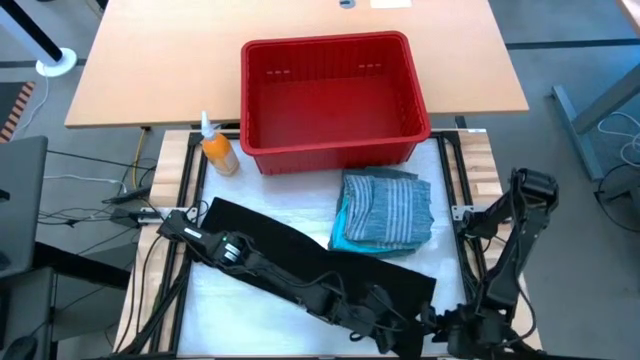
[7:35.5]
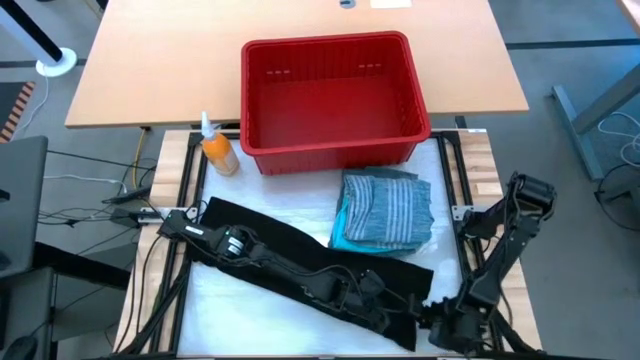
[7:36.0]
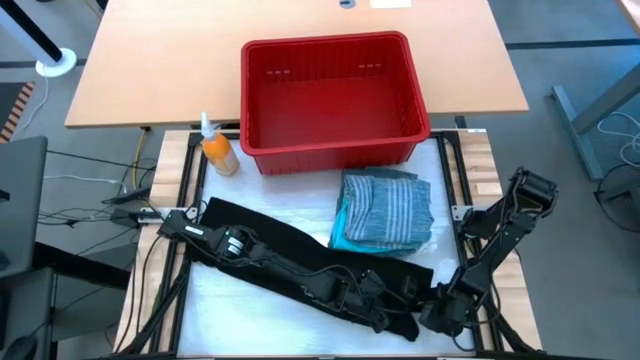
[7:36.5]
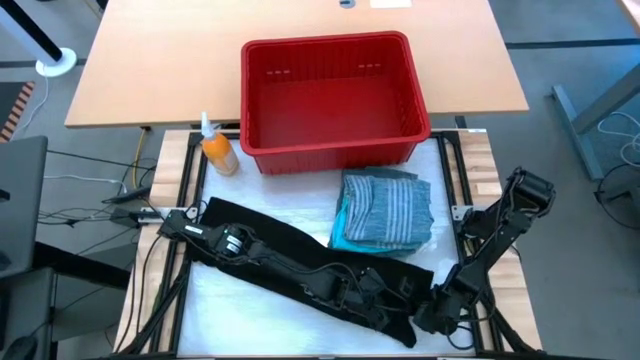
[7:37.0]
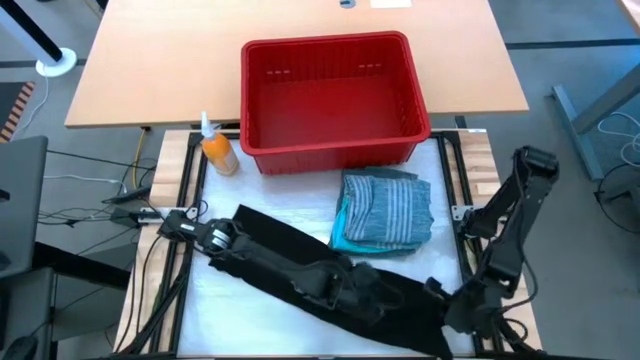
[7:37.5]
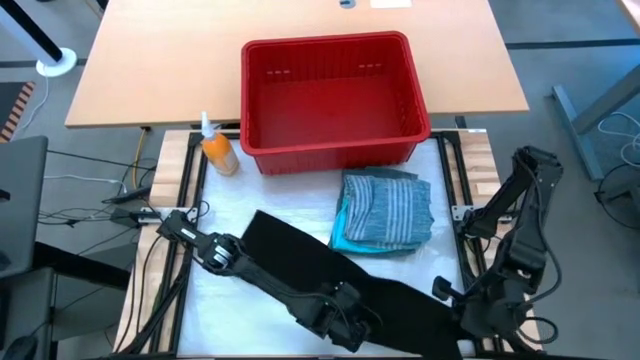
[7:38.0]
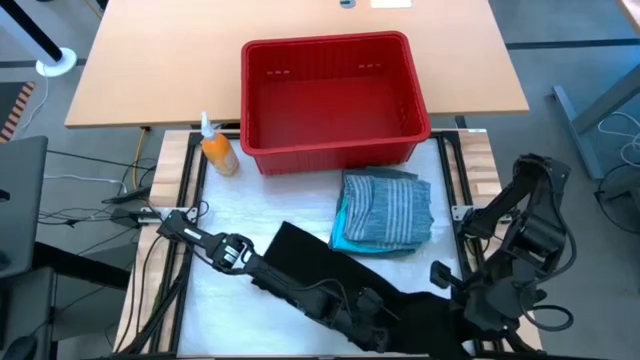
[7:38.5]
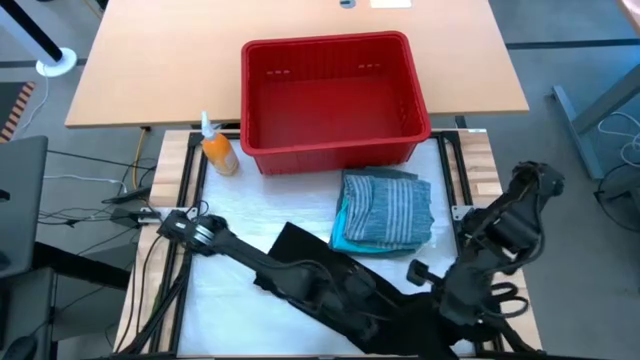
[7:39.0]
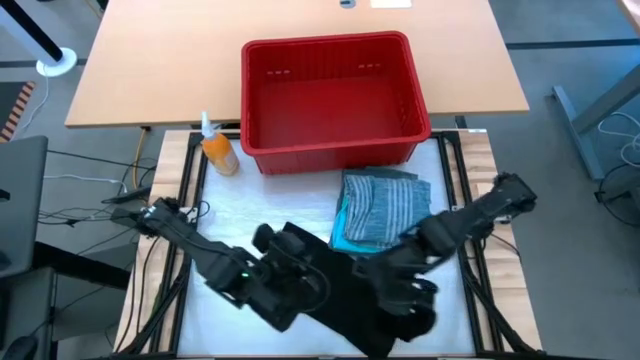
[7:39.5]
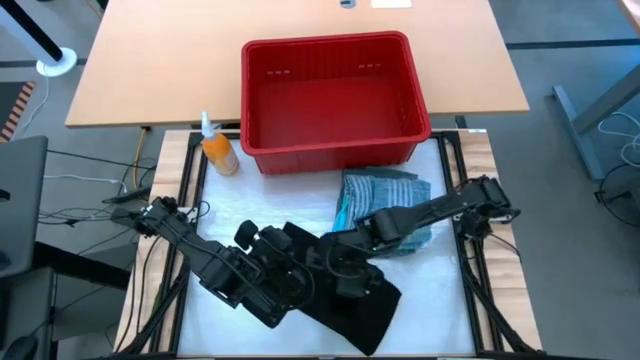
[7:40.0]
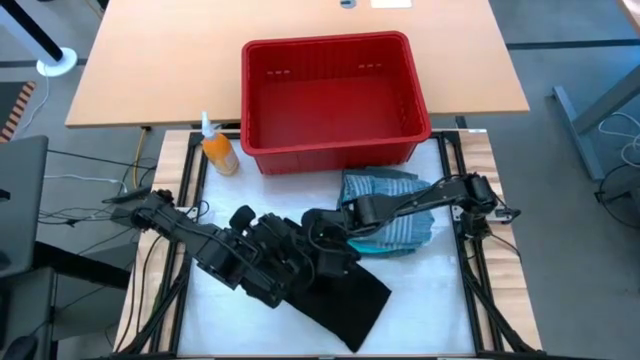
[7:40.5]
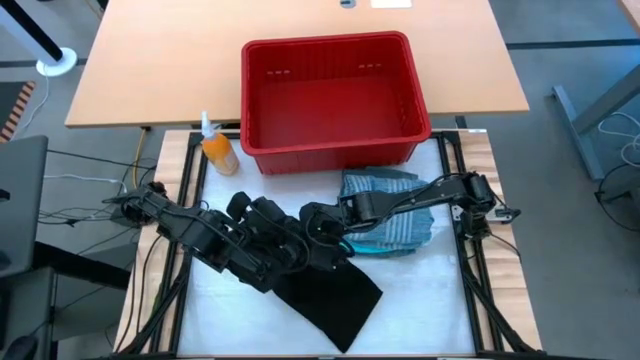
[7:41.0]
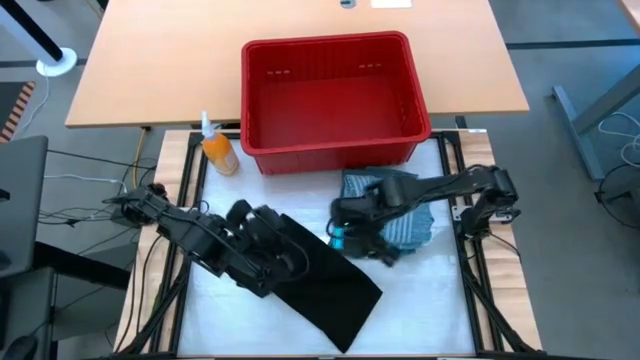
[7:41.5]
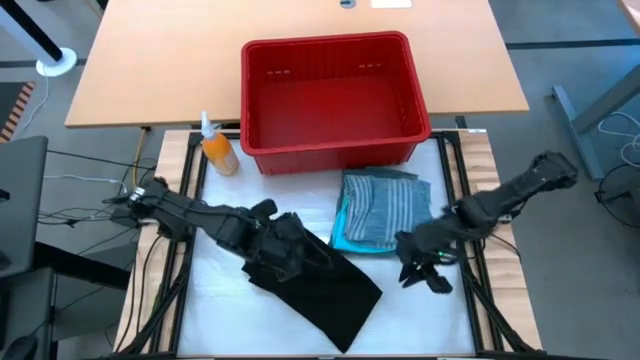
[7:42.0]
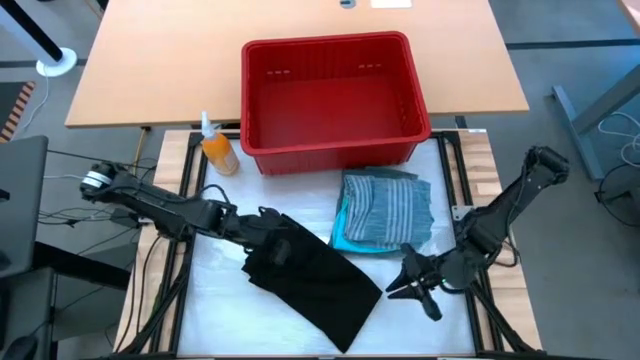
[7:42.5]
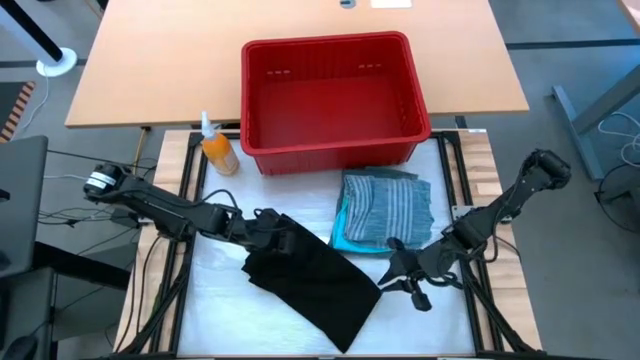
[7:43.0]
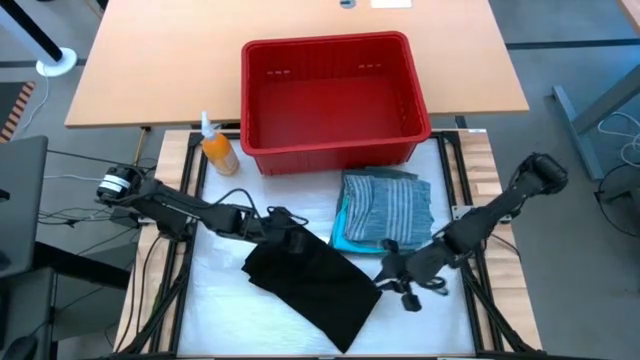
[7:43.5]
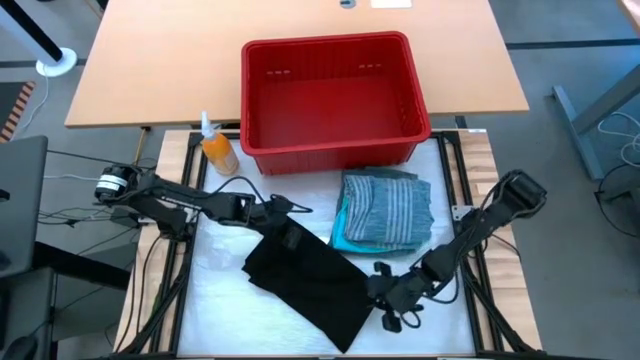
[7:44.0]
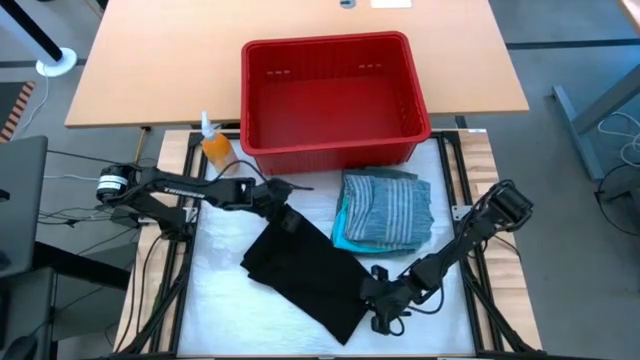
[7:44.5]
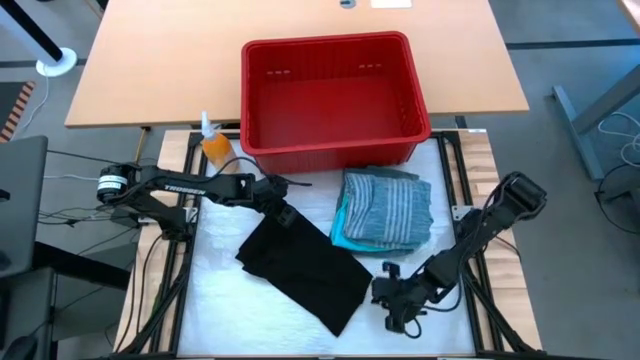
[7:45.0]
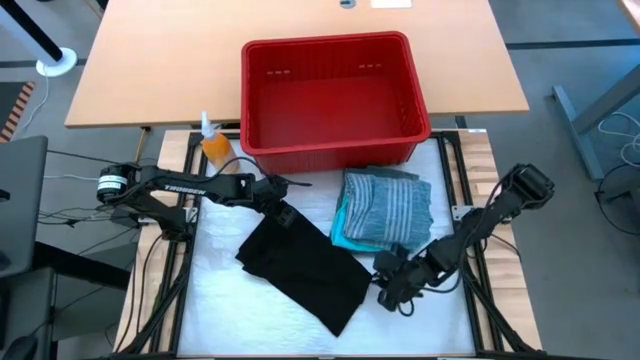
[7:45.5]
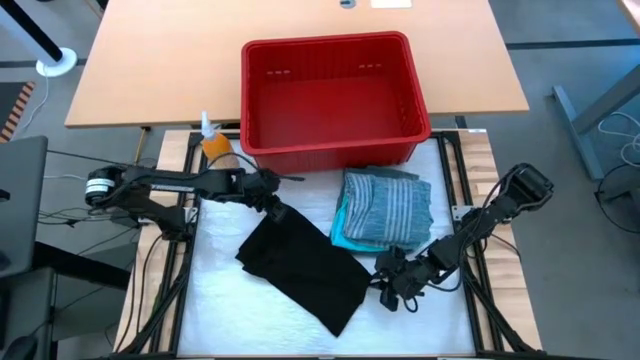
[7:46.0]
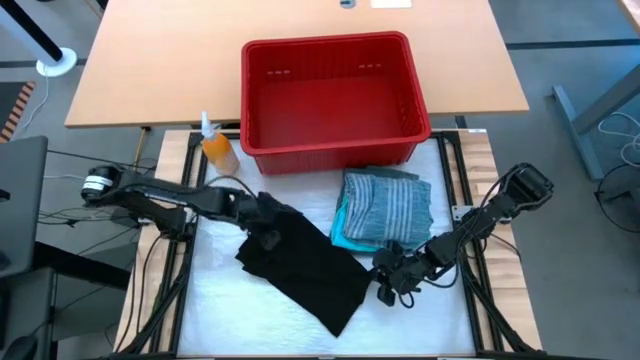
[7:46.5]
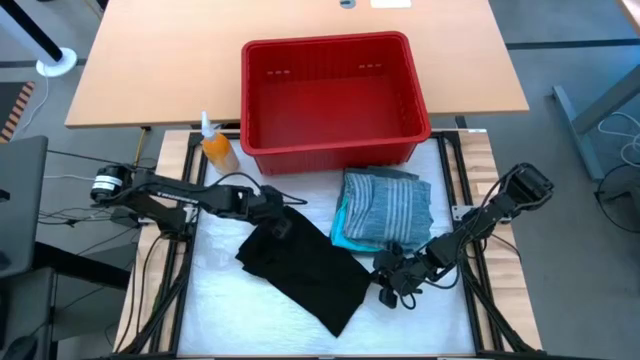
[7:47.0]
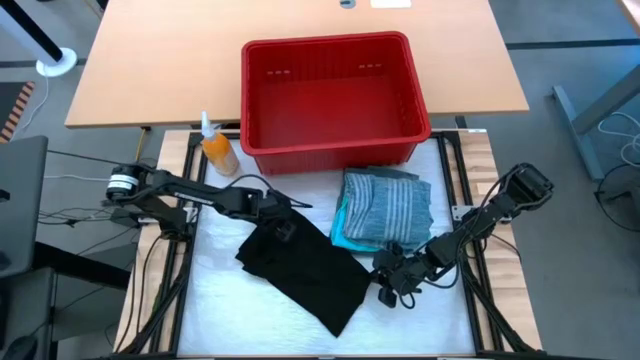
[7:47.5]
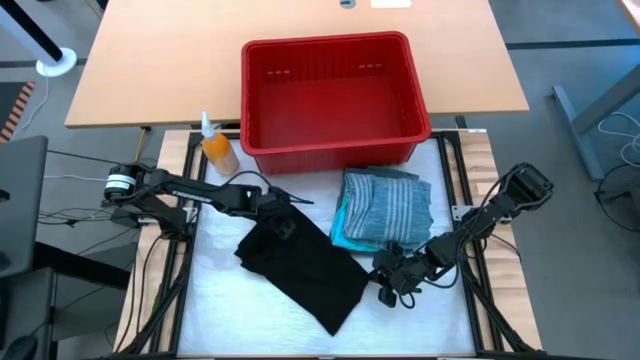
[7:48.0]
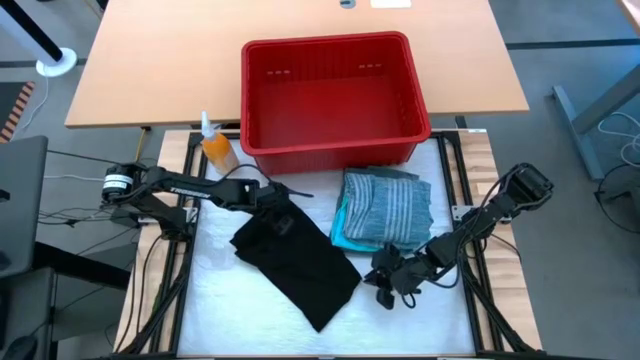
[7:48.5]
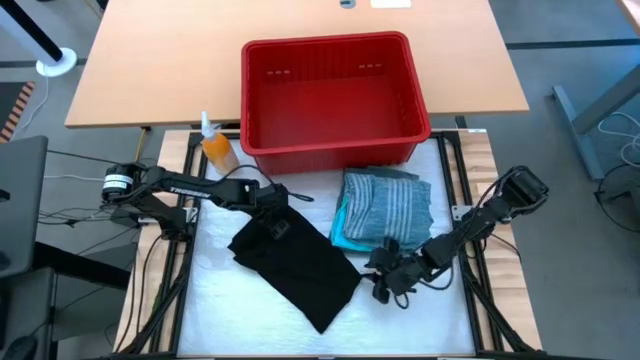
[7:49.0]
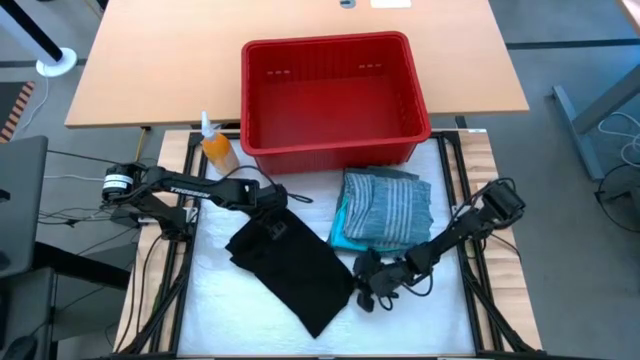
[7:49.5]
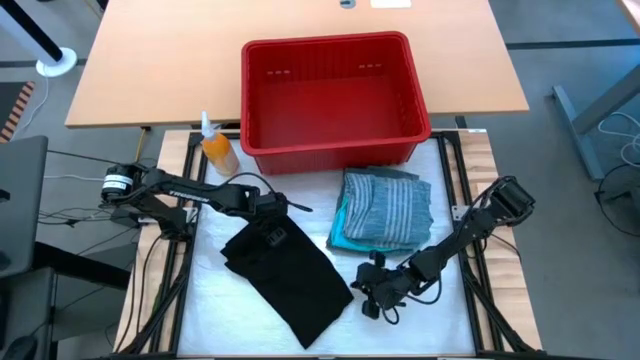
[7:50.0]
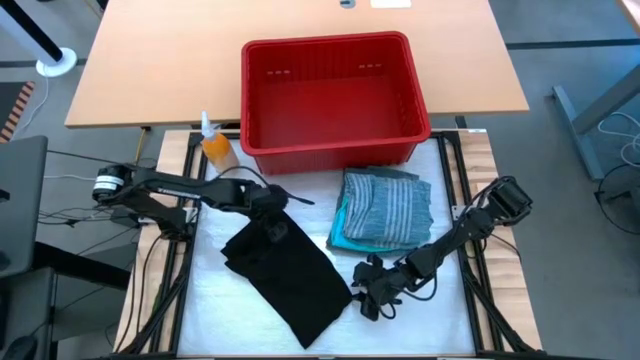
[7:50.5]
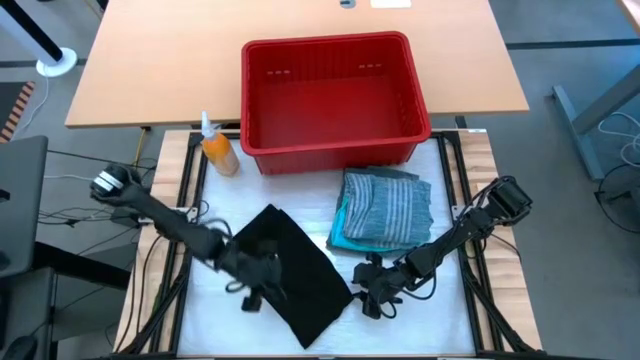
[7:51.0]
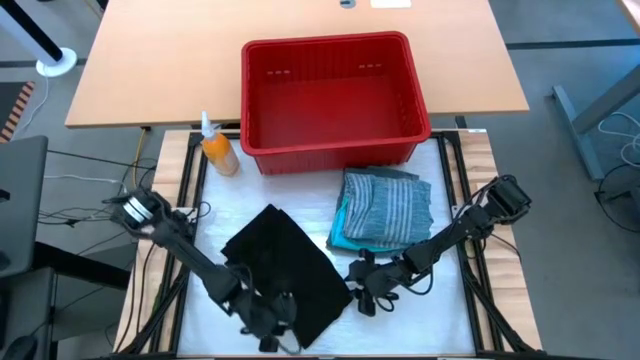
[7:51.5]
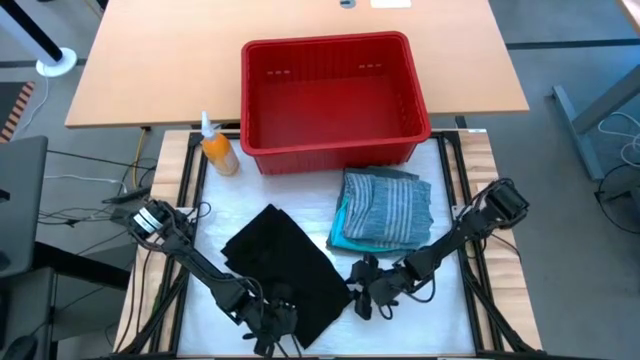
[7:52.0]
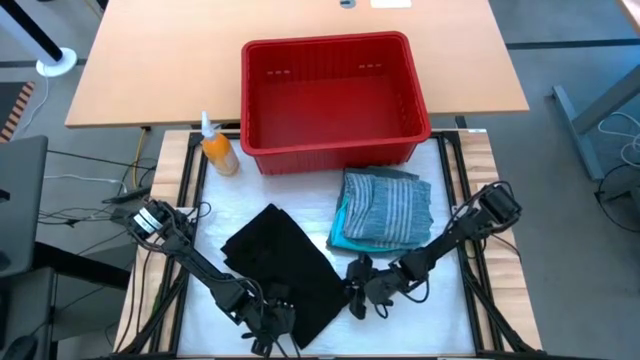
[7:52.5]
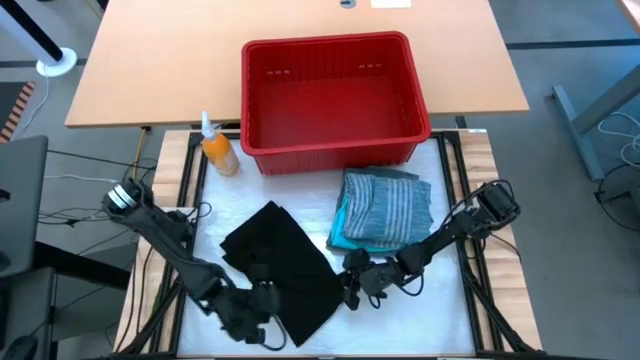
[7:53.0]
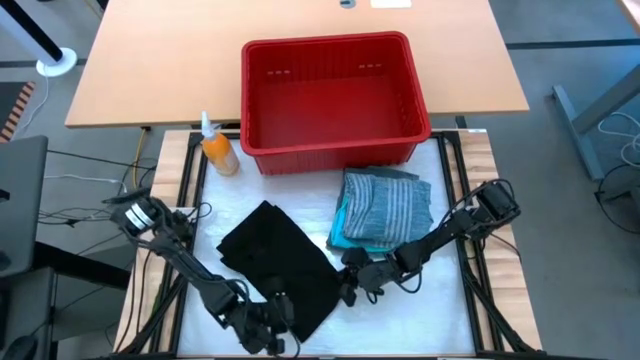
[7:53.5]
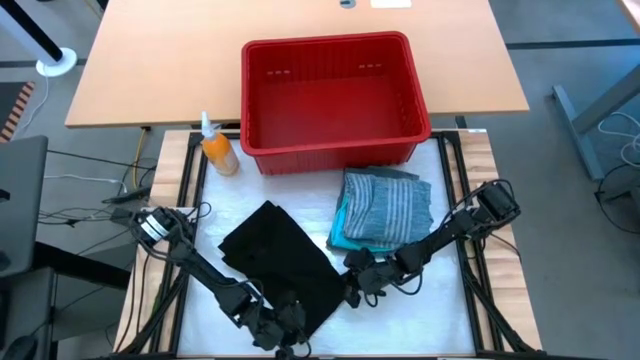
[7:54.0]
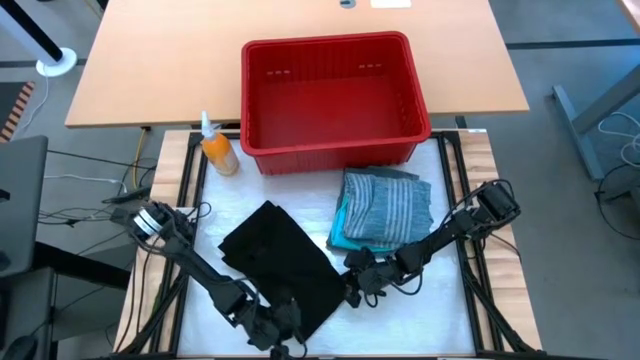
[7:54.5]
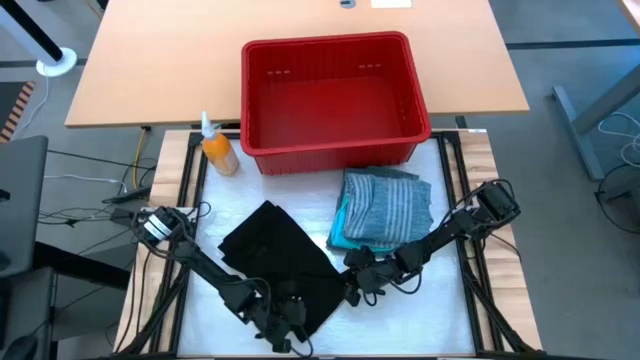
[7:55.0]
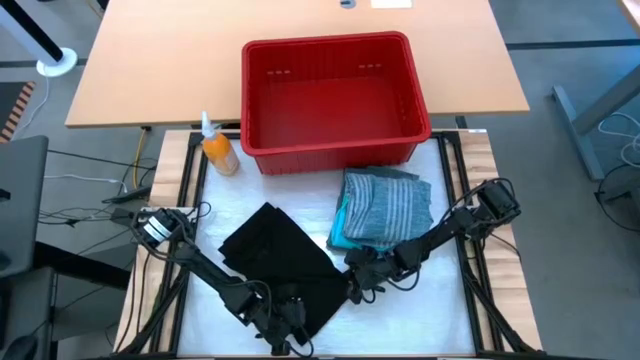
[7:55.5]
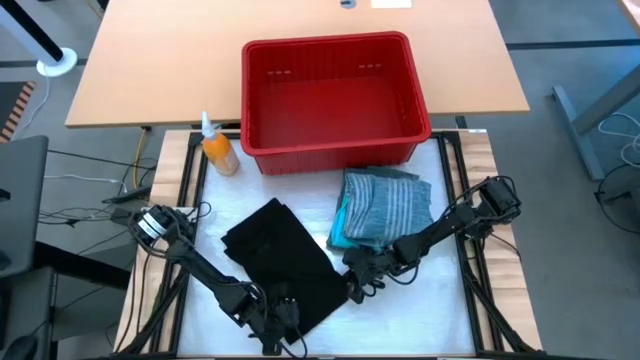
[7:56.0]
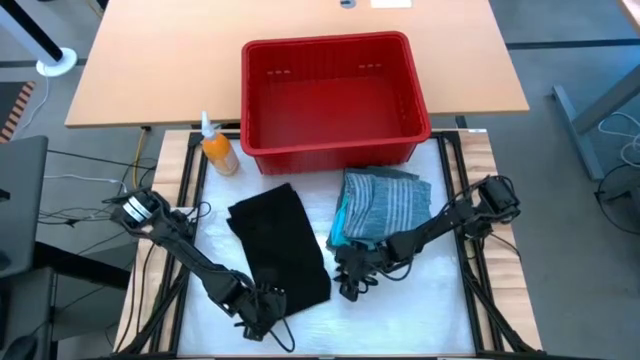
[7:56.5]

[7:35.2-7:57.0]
Task: Fold Laundry from Bin
Fold the black shirt
